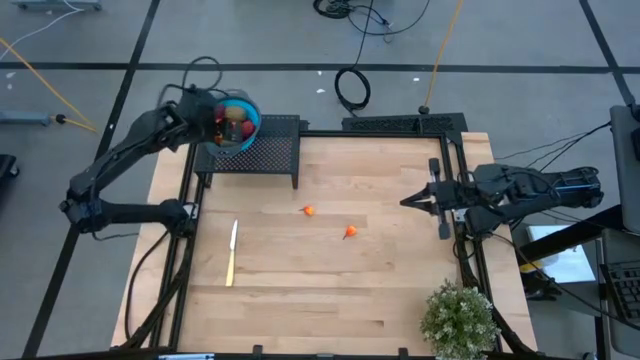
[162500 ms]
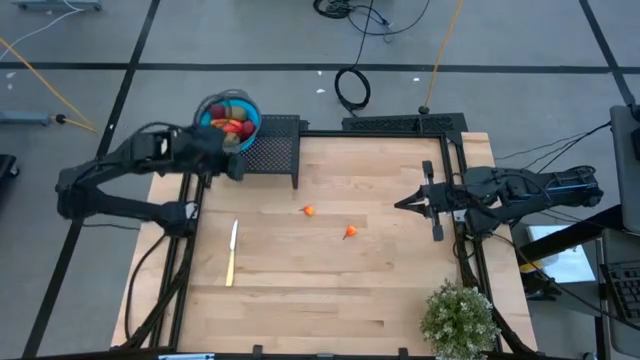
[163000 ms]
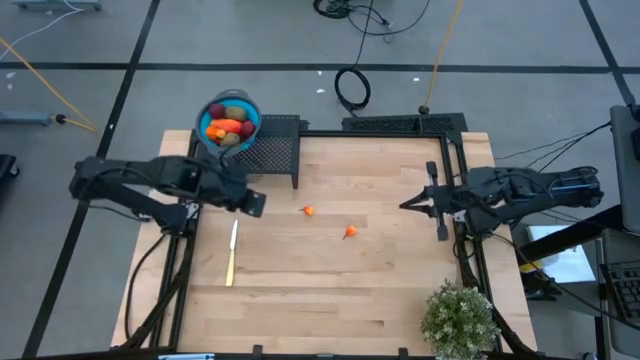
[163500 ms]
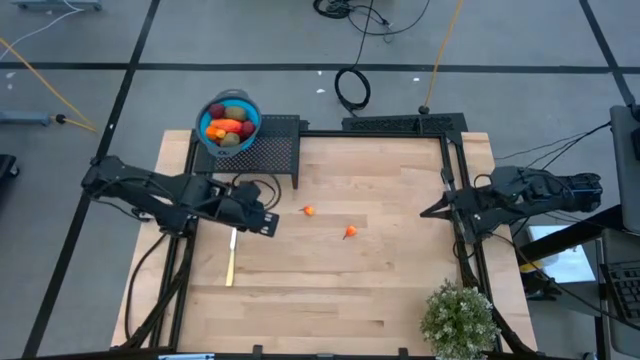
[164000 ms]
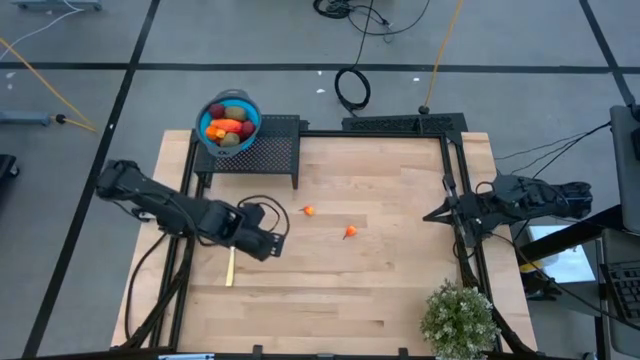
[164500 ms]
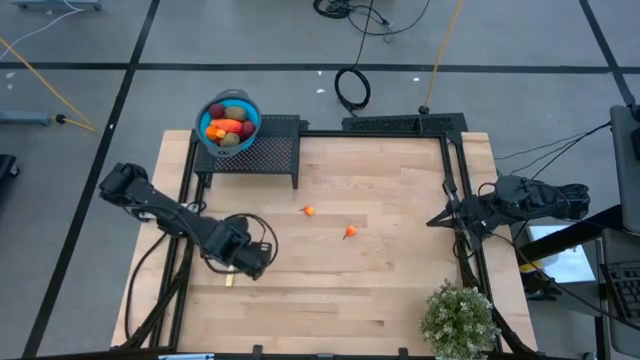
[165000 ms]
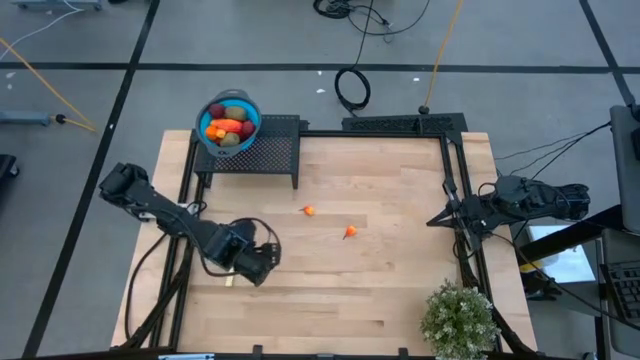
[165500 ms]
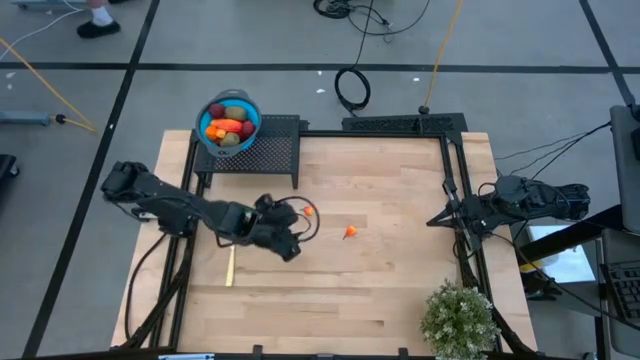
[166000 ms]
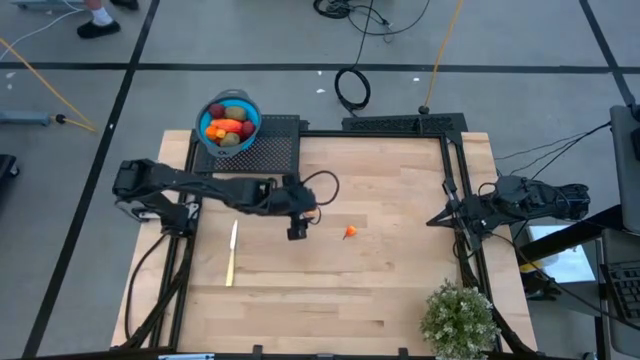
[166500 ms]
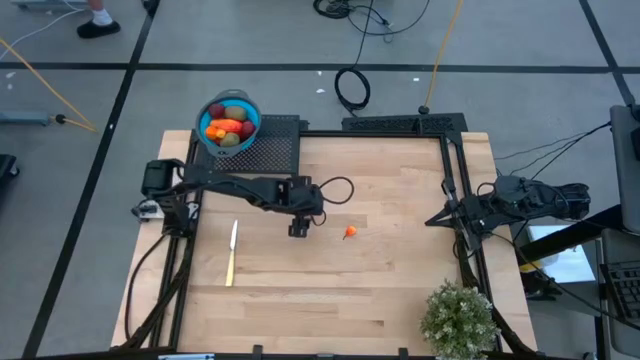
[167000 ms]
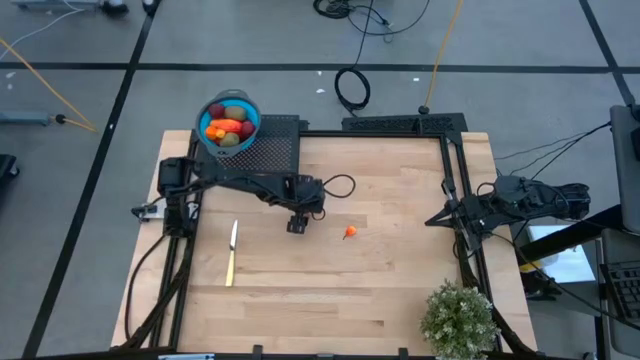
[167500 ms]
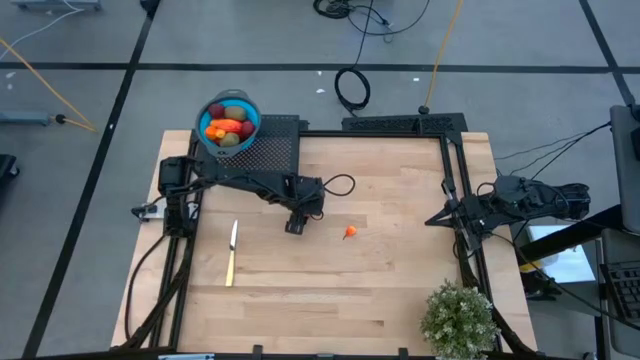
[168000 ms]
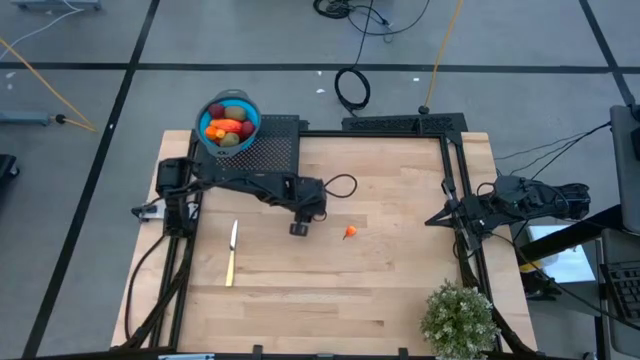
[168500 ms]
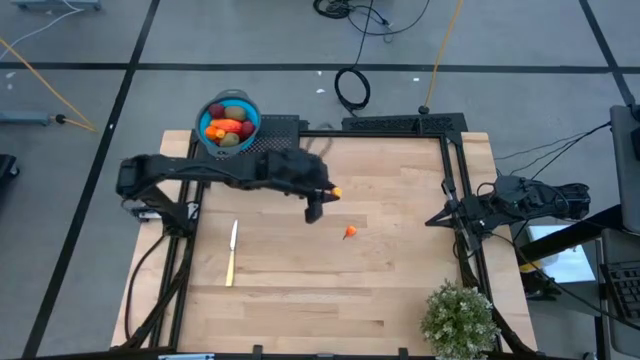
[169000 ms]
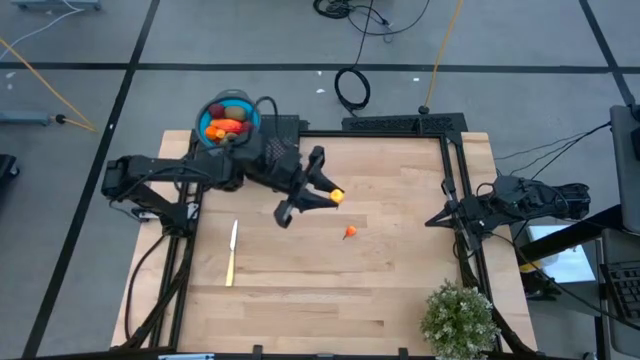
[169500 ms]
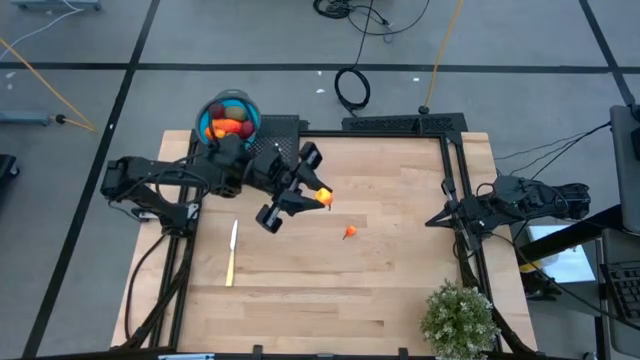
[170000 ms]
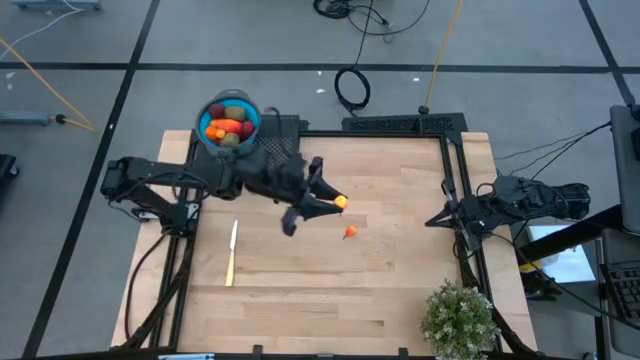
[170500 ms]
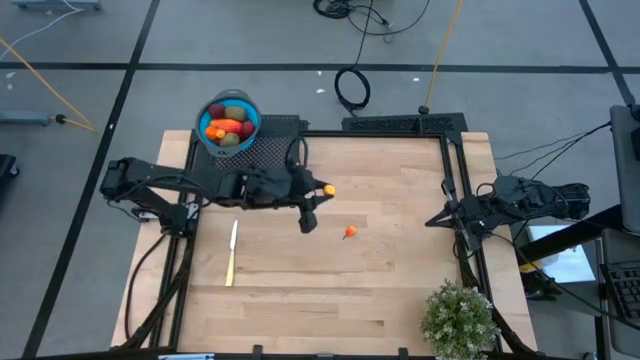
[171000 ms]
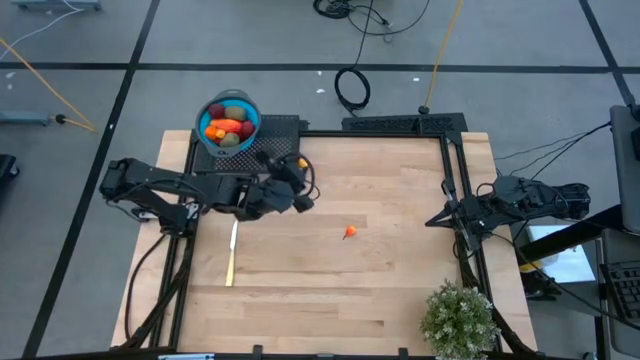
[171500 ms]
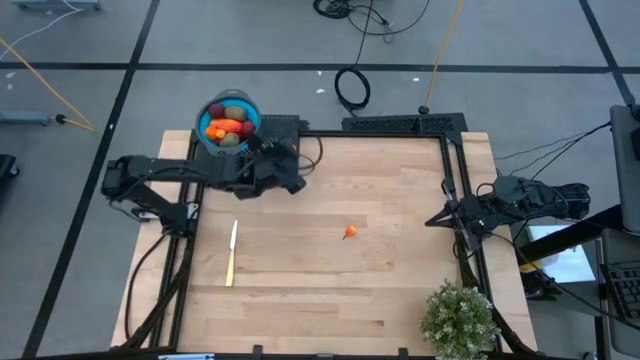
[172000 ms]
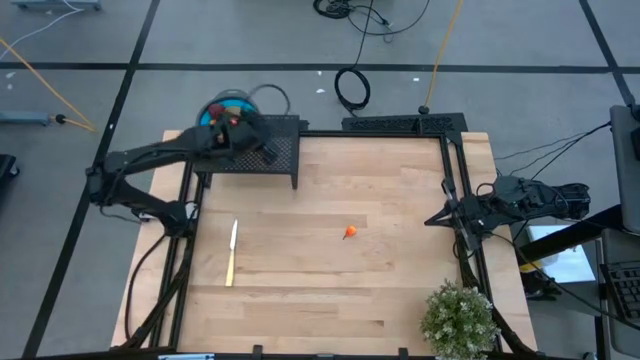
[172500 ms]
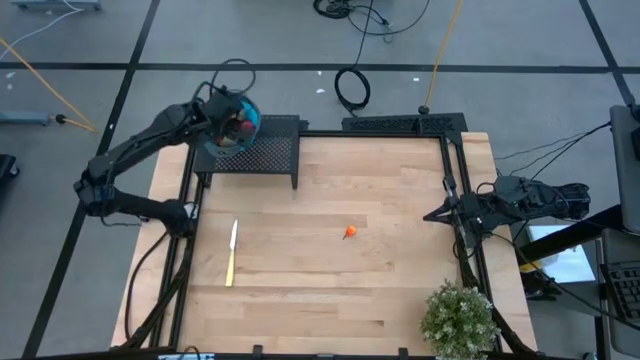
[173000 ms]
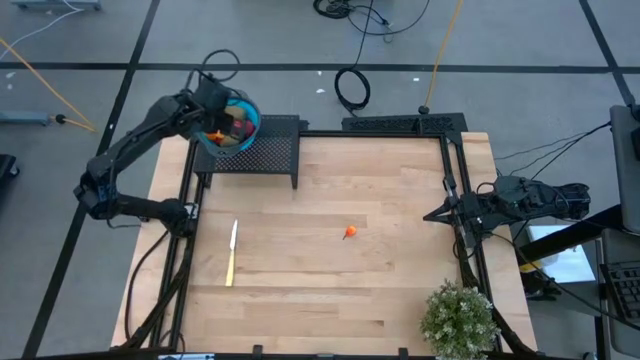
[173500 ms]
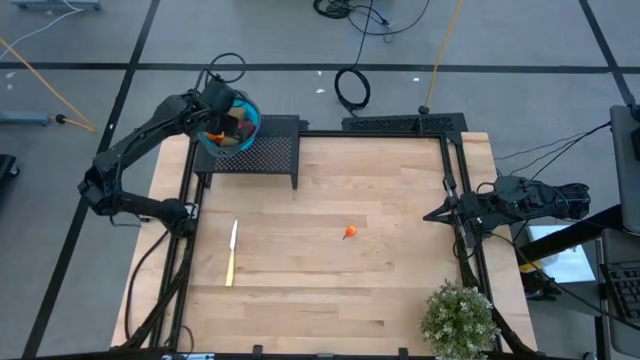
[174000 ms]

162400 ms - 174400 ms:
Task: Pick & Place Fruit
Put the pear into the blue strainer bowl on the shelf
